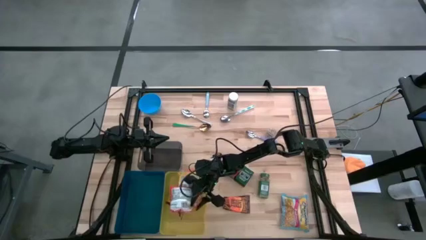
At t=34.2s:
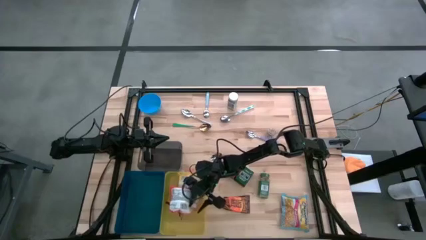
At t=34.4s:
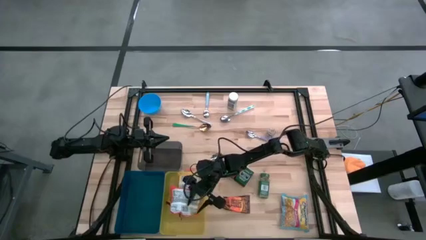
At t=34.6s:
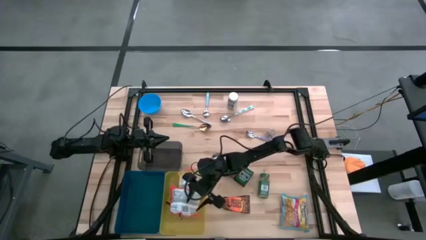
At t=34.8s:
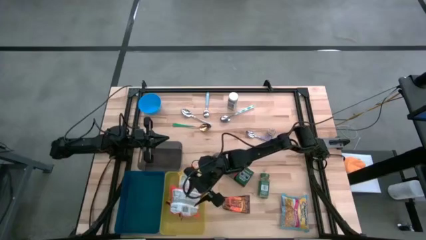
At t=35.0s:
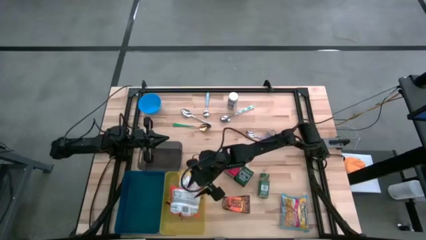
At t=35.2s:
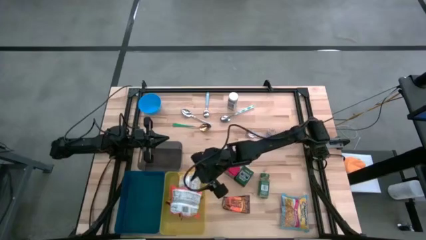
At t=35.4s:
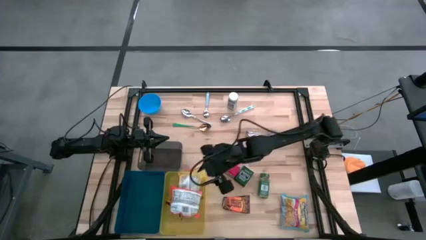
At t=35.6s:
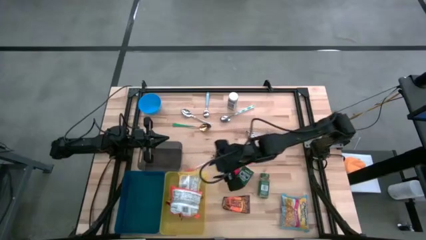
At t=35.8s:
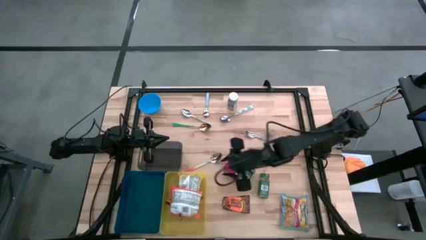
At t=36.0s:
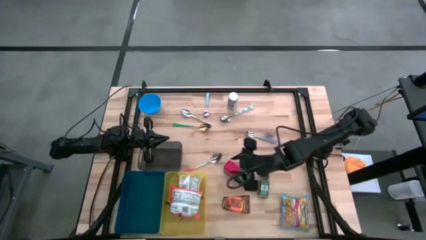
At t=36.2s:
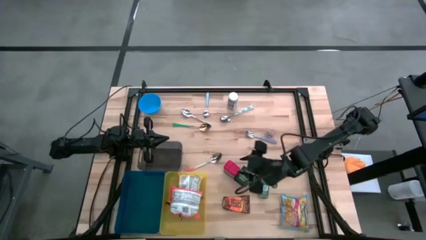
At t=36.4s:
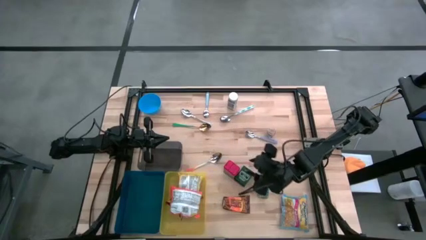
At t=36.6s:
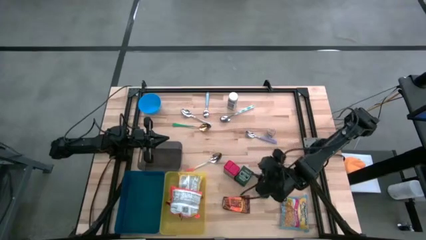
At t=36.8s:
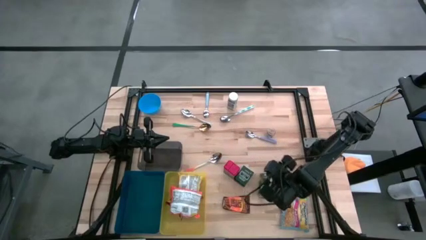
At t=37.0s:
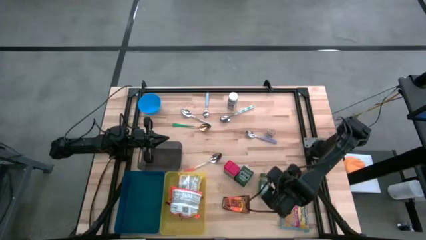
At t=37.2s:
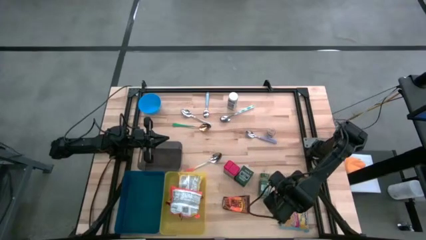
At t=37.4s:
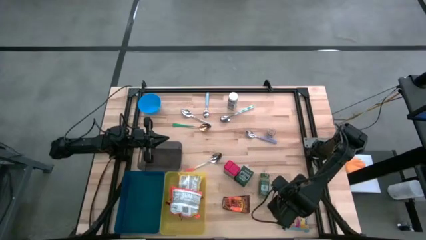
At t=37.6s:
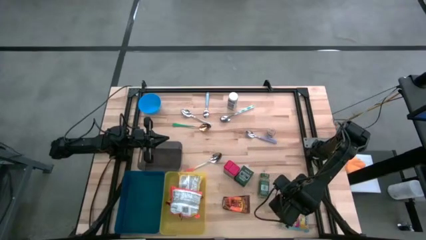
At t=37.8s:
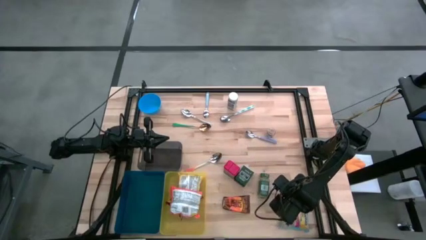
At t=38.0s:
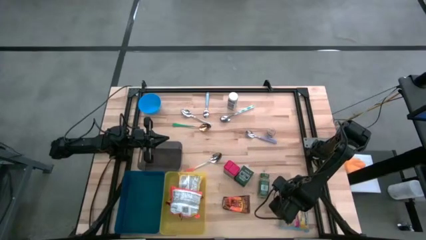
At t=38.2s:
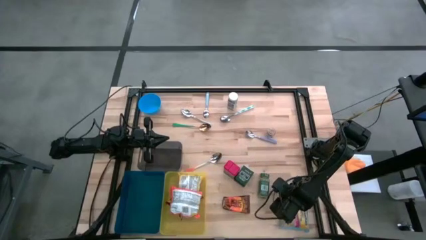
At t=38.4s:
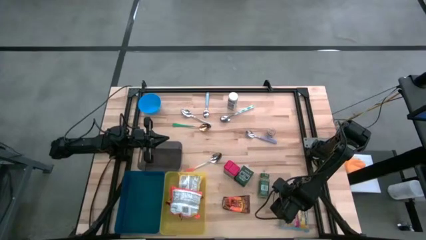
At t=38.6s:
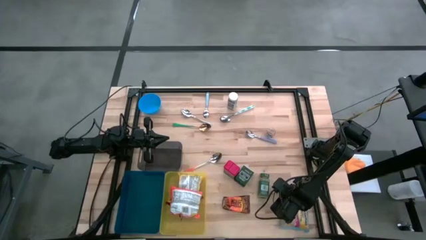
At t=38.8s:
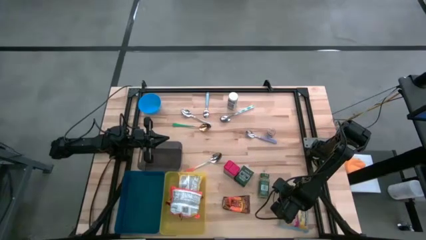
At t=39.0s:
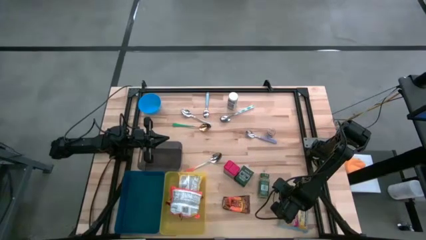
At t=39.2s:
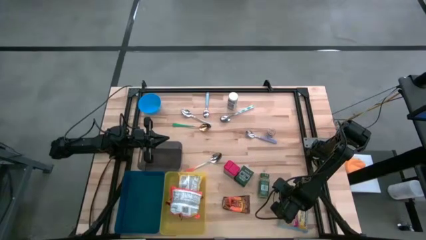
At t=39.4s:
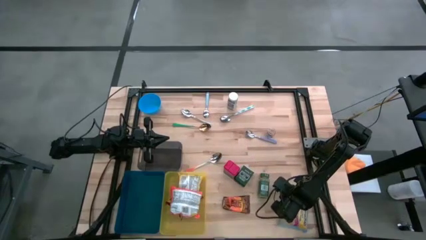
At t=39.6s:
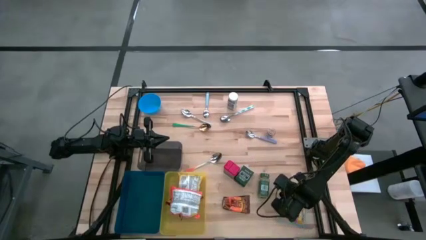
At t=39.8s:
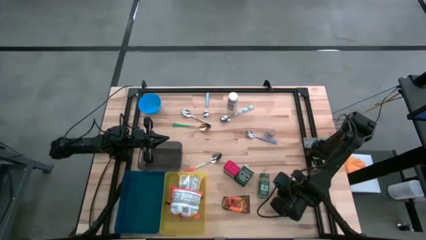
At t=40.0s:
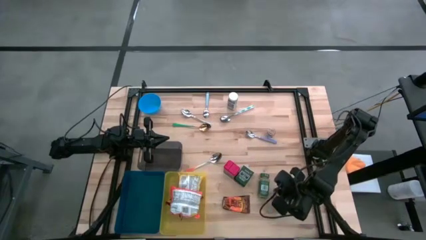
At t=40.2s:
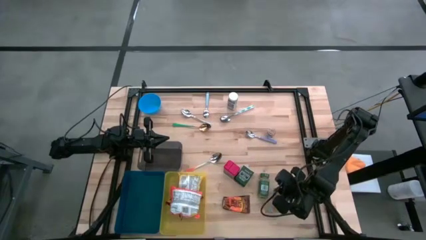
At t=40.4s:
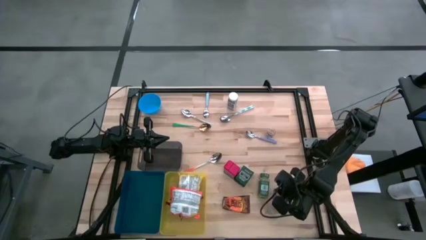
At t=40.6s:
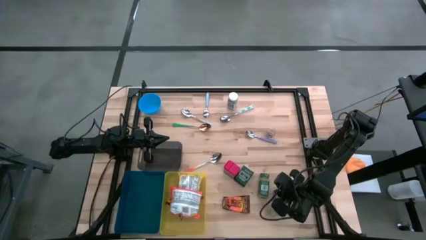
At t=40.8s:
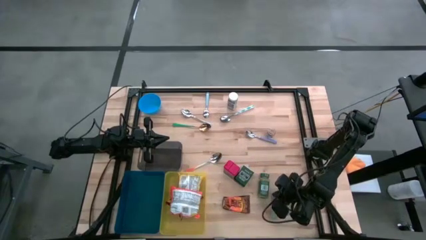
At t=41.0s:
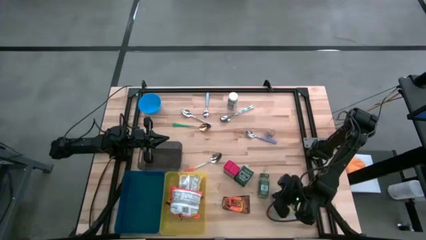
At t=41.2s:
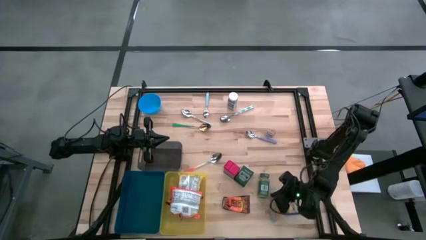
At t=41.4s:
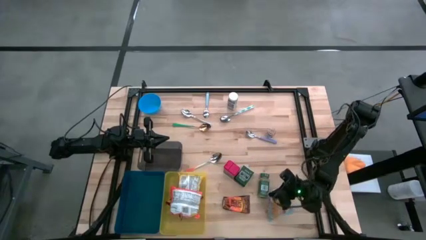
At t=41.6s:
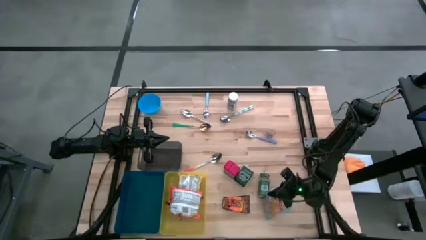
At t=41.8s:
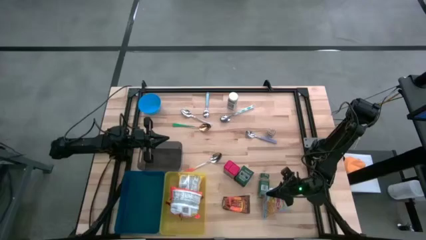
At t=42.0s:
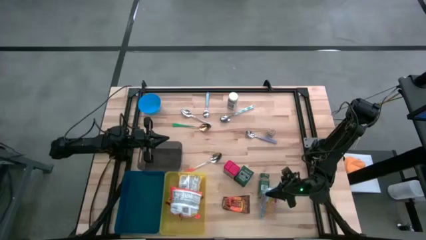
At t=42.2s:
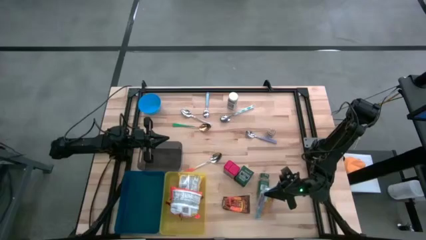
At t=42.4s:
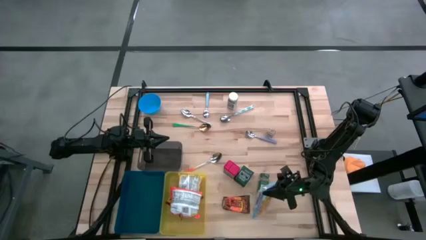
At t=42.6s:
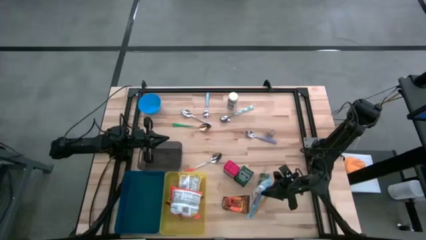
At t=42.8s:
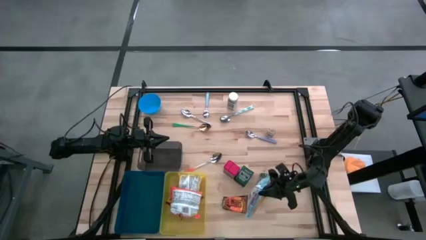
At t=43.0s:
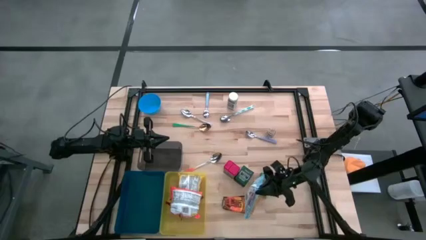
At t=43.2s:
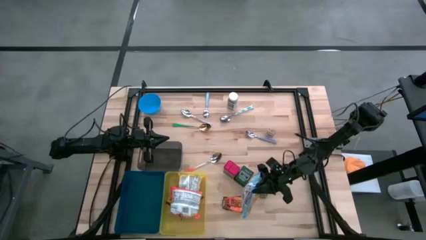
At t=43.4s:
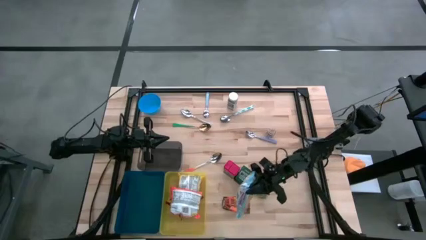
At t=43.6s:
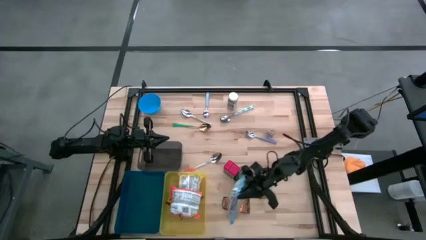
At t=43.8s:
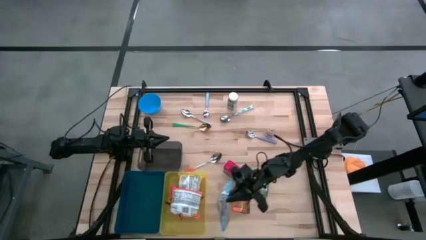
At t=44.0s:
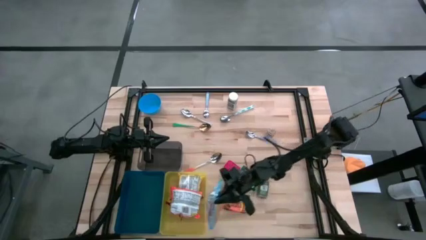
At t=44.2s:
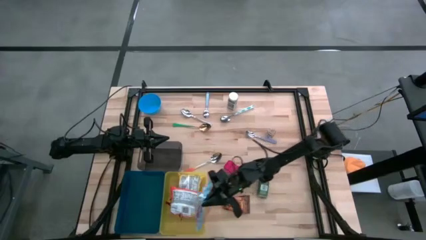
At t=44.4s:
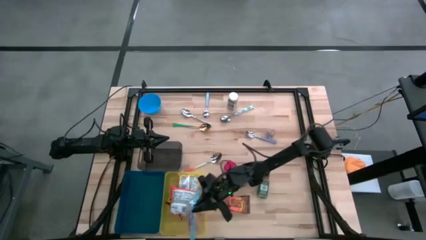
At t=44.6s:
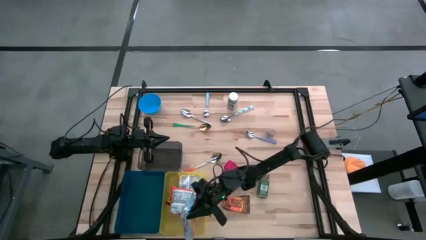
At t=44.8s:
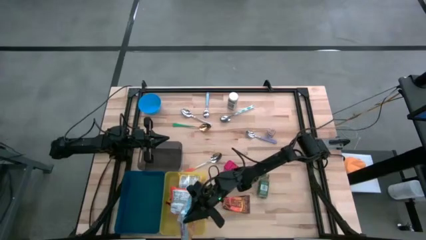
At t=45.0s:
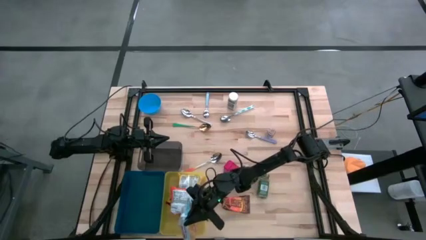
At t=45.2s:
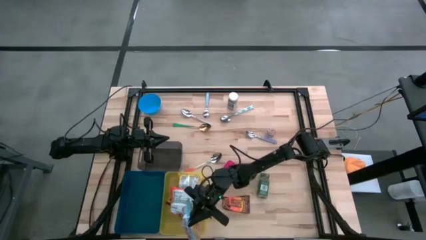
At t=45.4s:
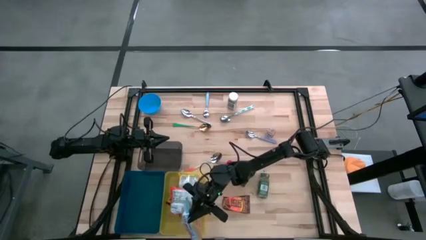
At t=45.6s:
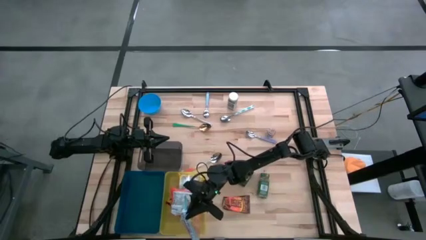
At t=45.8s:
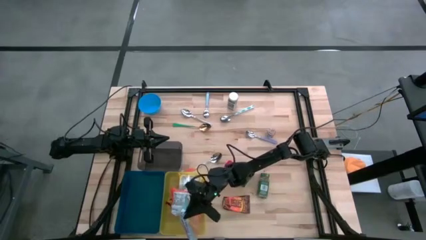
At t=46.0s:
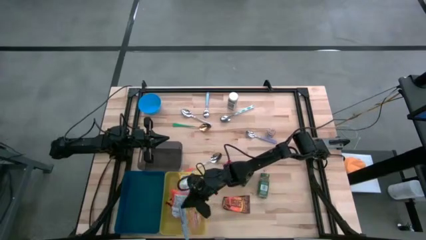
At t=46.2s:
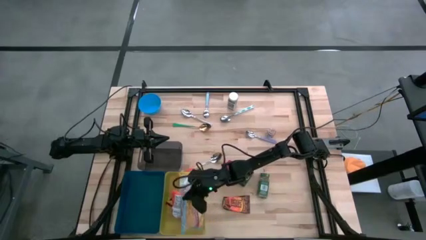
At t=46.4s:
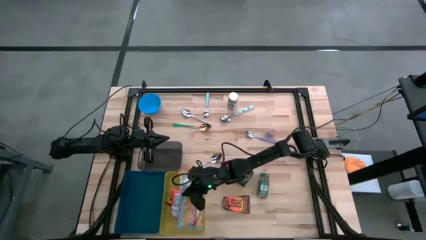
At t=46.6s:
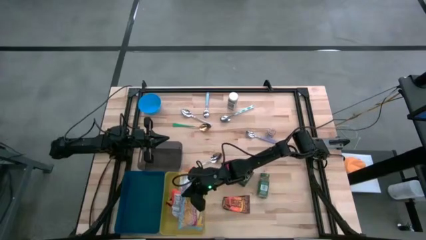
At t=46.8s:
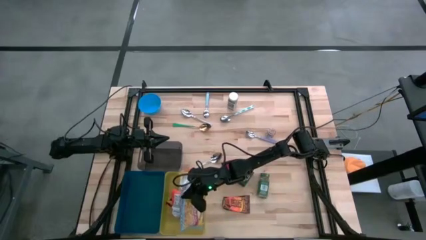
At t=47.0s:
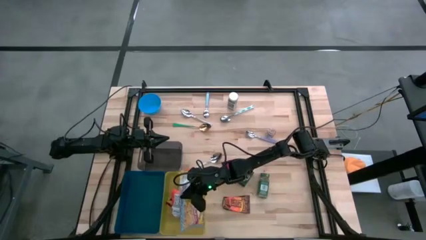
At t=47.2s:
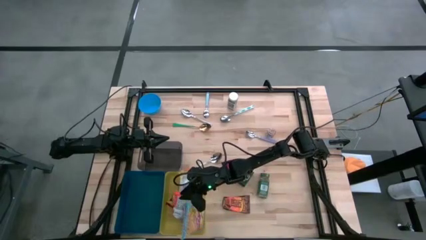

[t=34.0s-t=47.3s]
Put the blue noodle pack into the yellow bin

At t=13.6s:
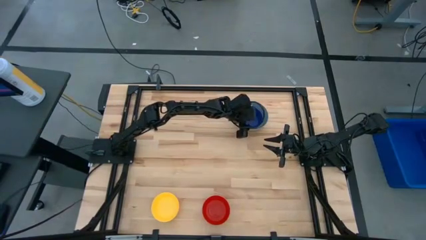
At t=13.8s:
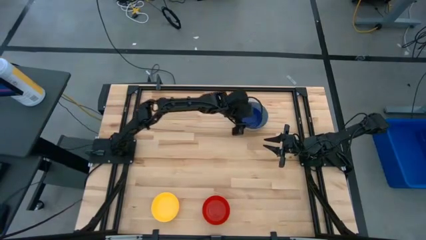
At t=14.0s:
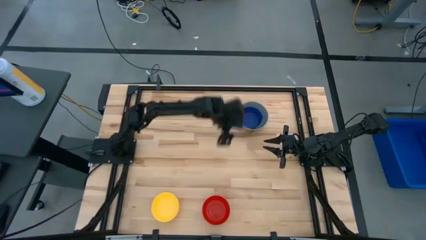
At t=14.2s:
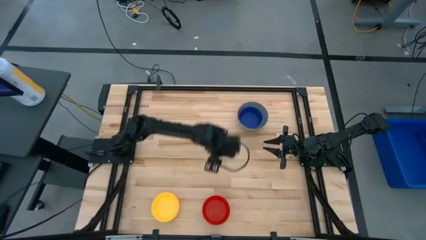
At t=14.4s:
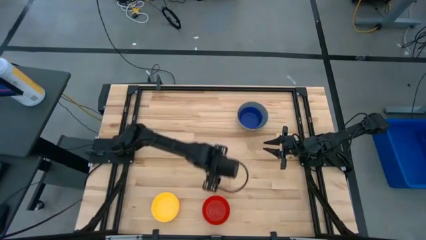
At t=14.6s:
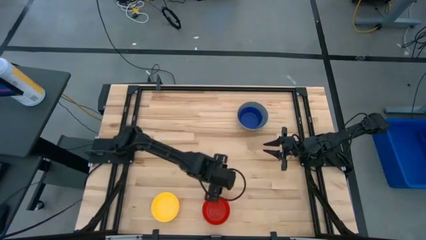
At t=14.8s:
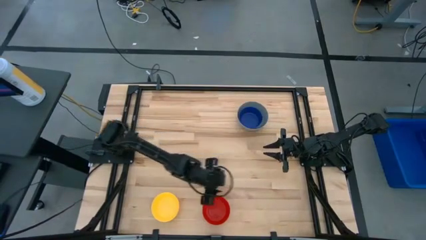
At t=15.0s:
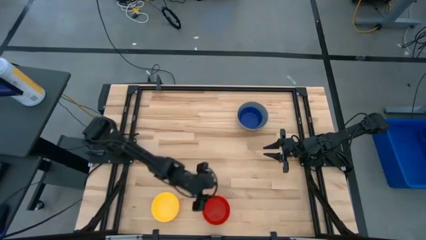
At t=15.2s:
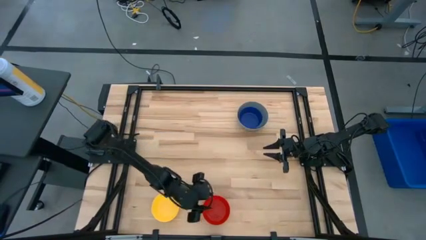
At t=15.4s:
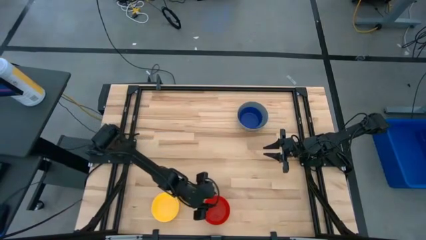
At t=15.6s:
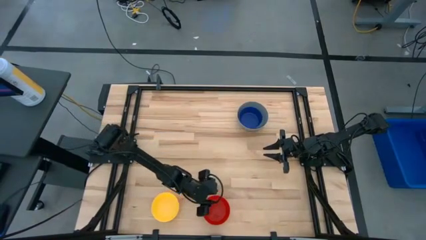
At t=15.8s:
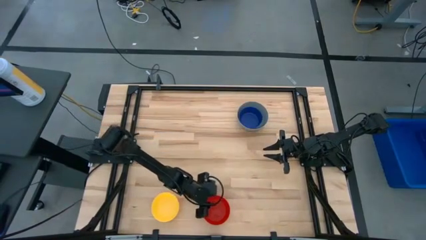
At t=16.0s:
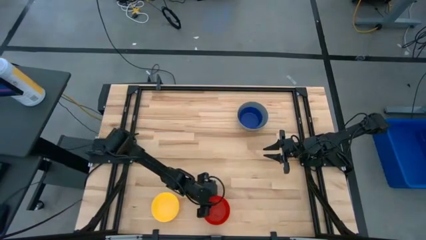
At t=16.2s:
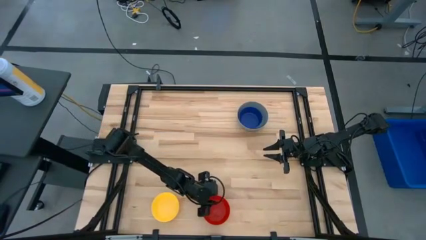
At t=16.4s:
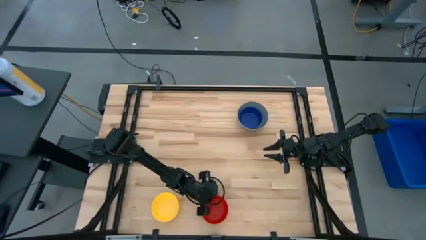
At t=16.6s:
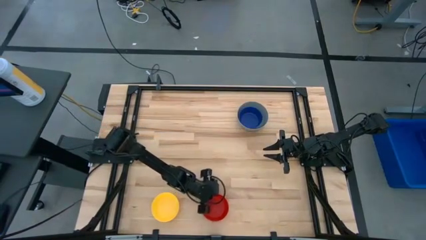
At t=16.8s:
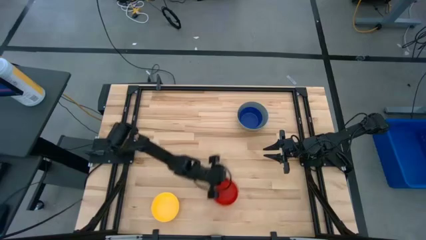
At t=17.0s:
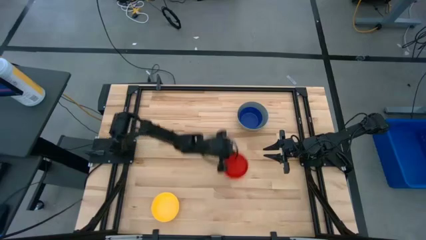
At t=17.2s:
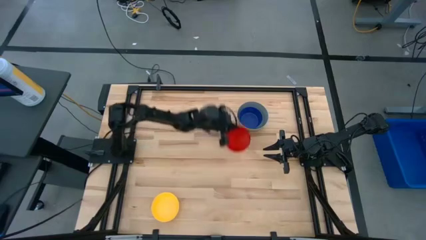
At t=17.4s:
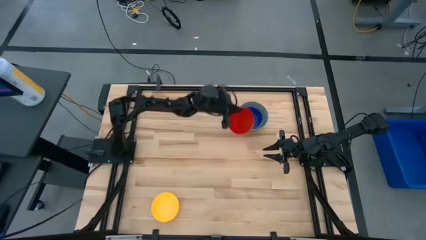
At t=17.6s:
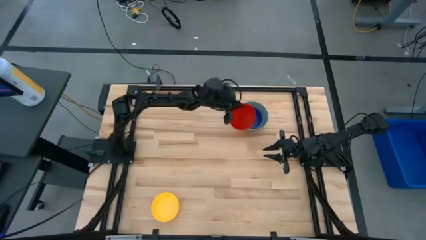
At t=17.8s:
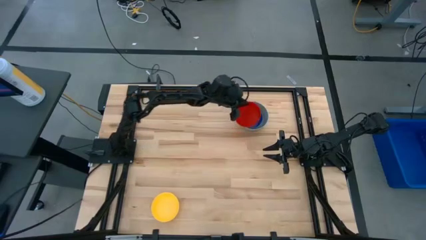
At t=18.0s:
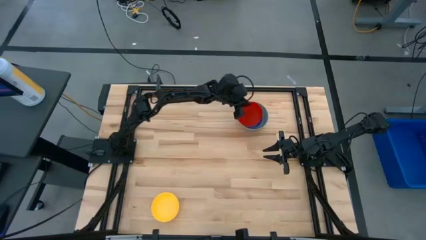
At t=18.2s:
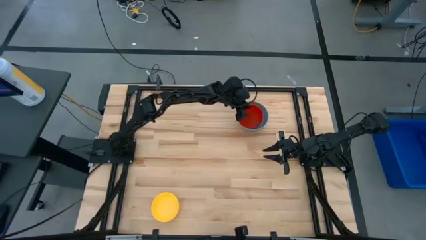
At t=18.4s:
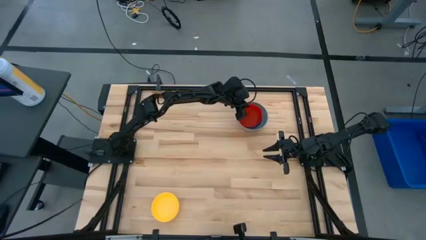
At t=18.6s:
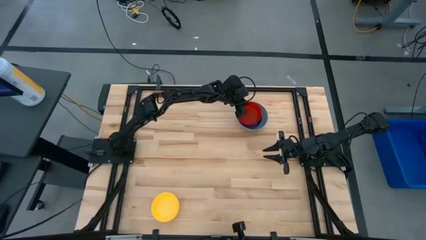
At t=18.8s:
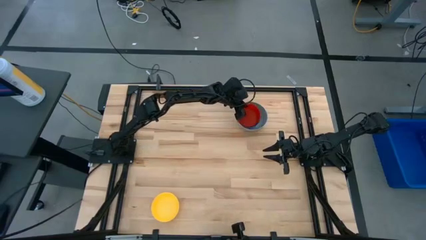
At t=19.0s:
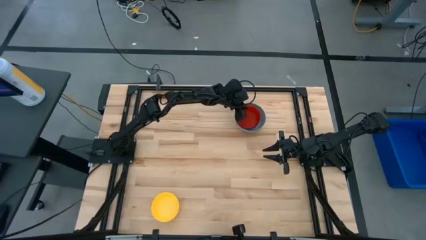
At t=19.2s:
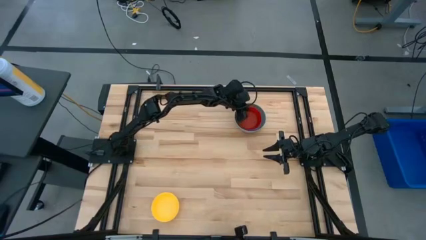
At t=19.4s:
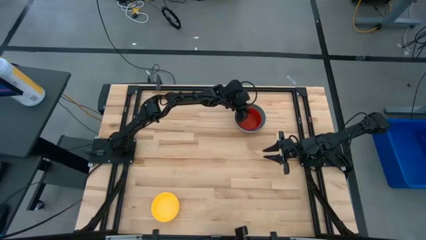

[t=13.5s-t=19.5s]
Stack the red bowl on top of the dark blue bowl
